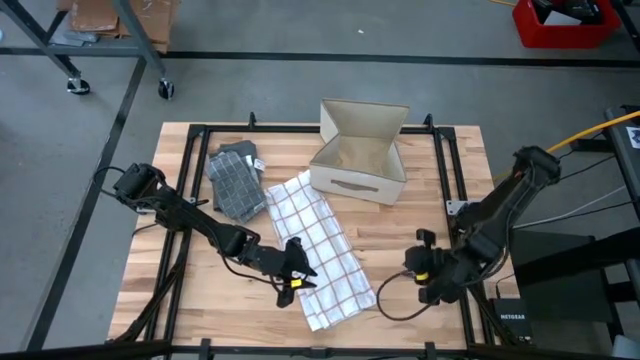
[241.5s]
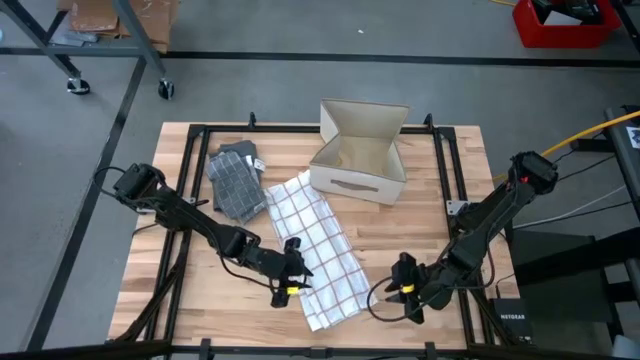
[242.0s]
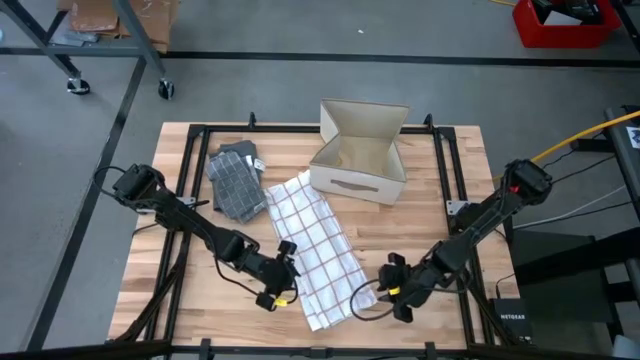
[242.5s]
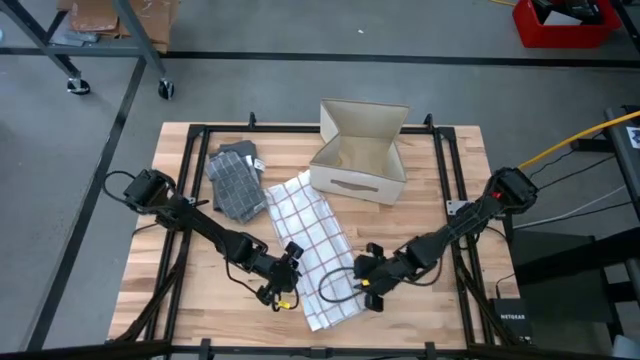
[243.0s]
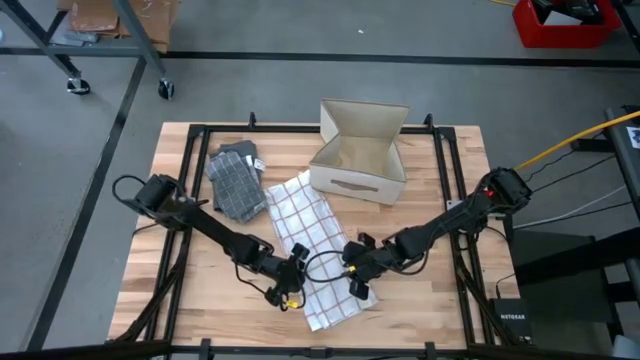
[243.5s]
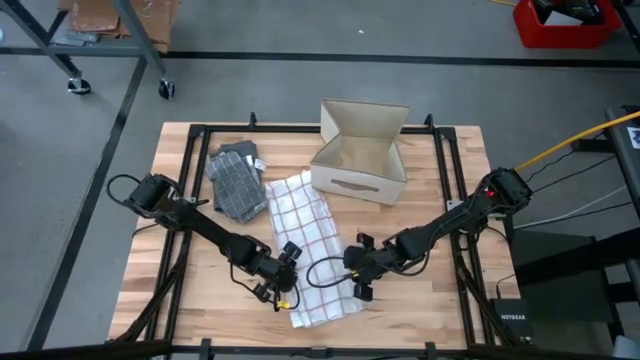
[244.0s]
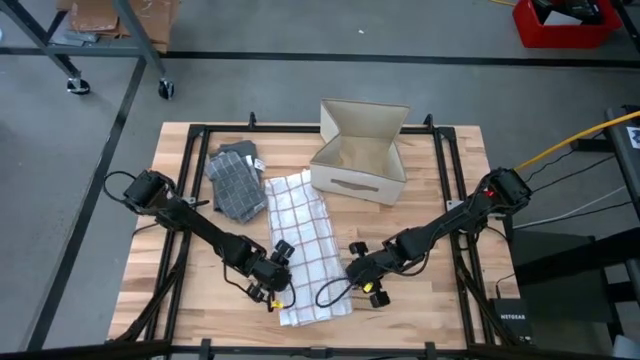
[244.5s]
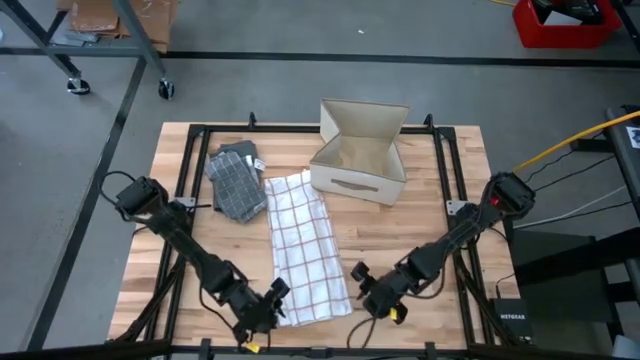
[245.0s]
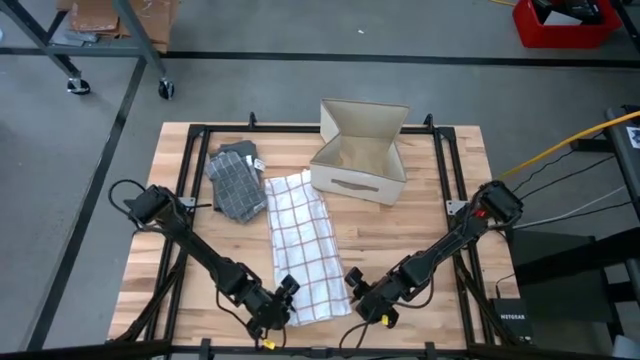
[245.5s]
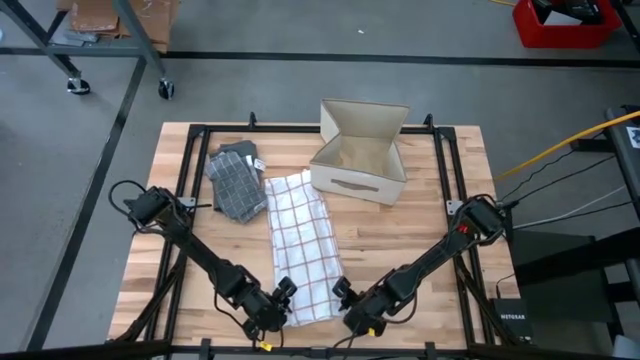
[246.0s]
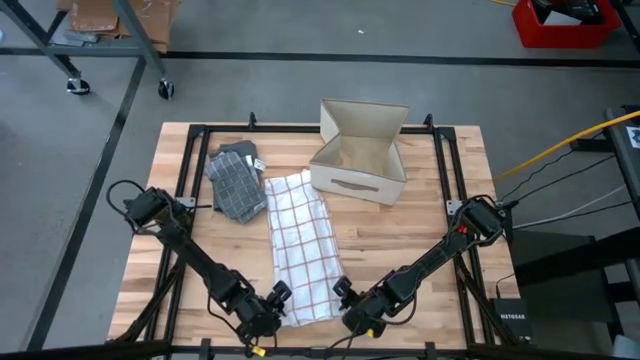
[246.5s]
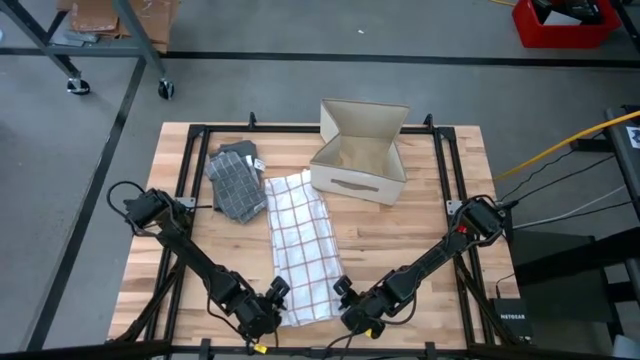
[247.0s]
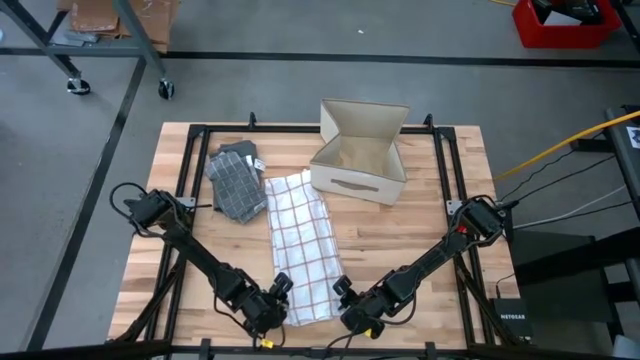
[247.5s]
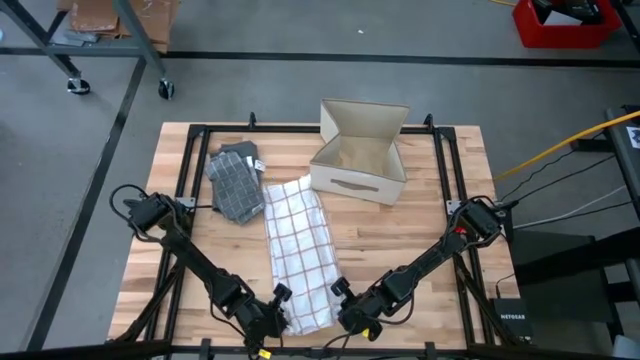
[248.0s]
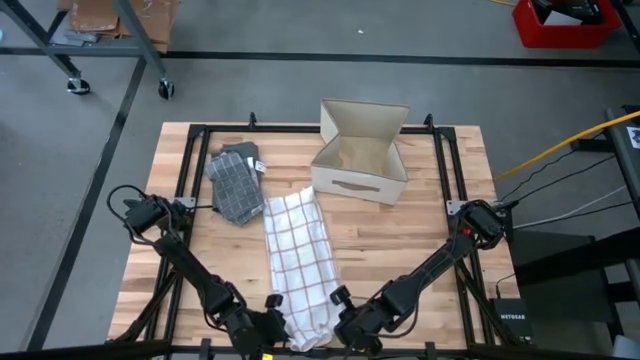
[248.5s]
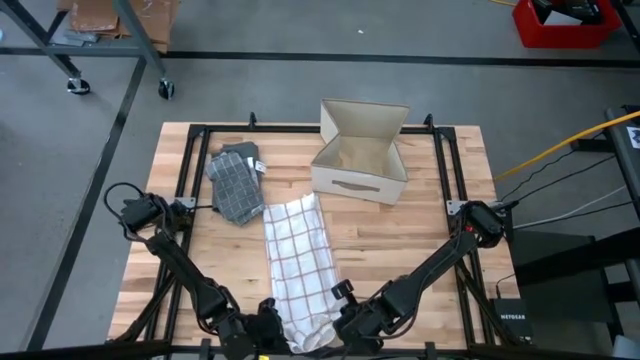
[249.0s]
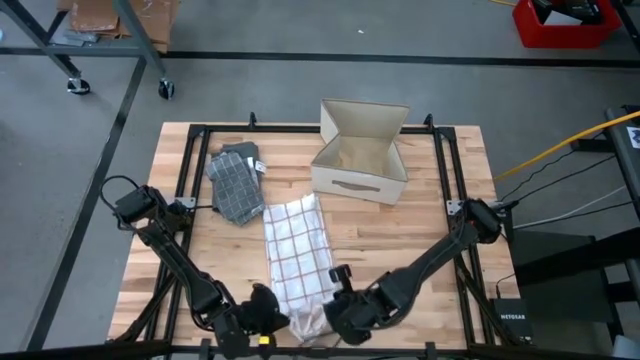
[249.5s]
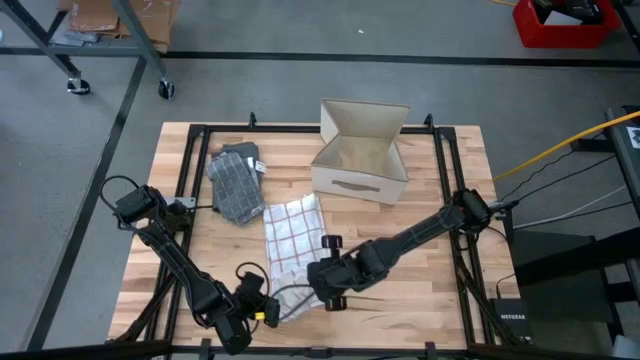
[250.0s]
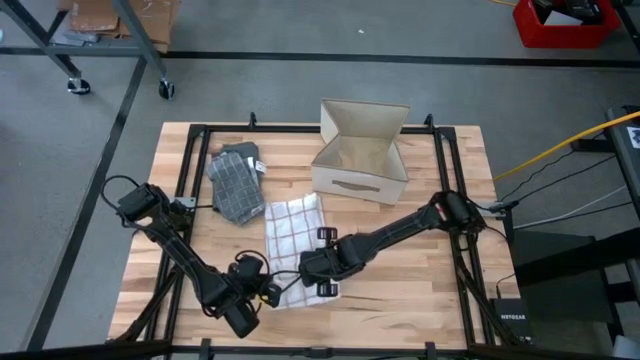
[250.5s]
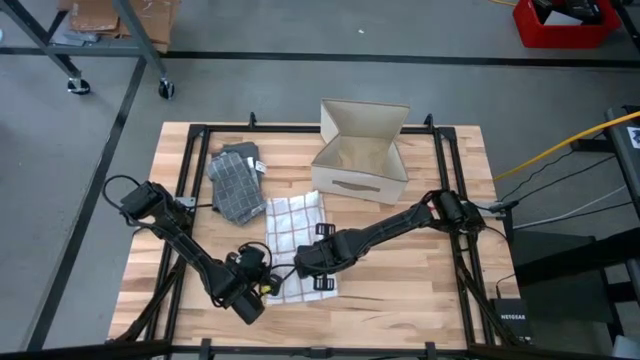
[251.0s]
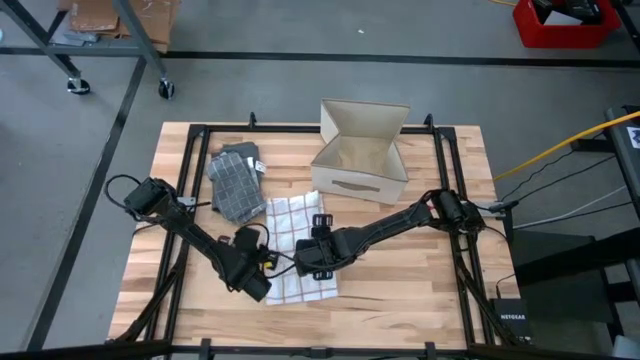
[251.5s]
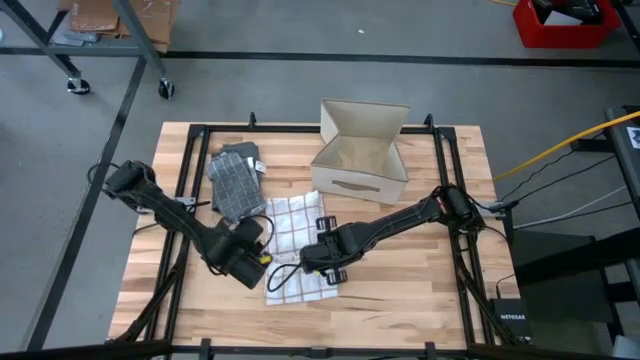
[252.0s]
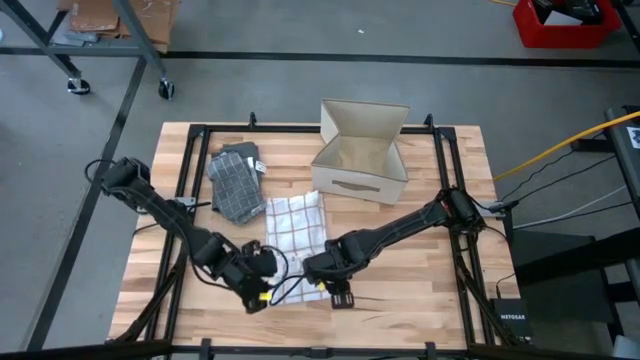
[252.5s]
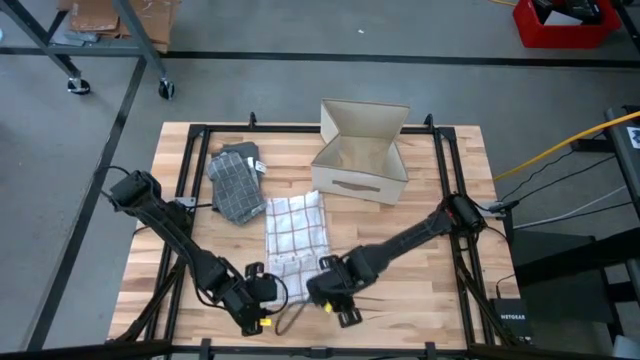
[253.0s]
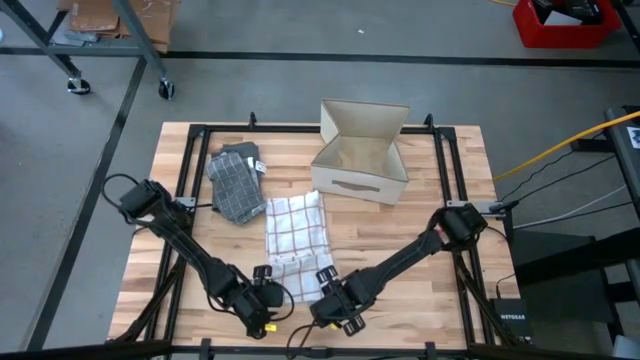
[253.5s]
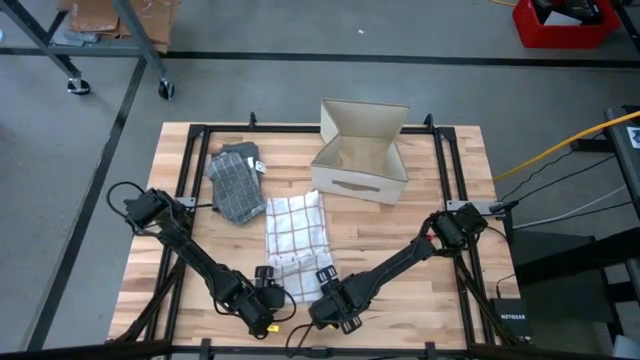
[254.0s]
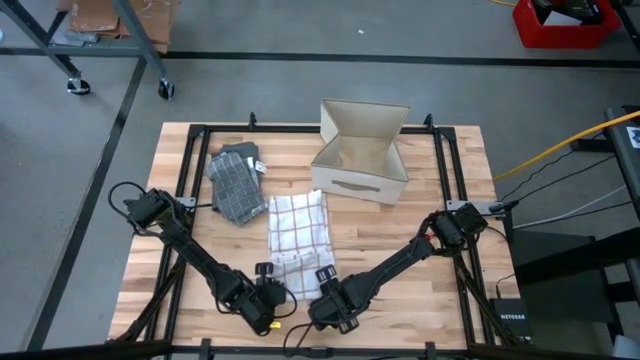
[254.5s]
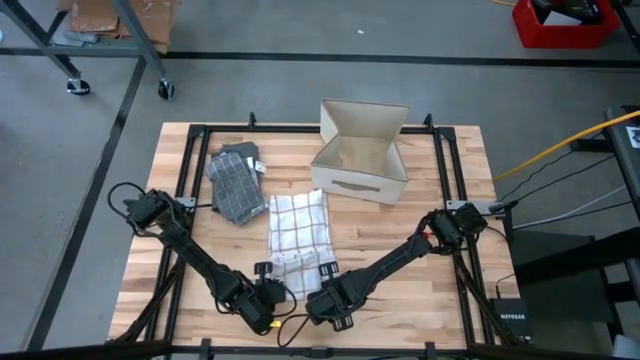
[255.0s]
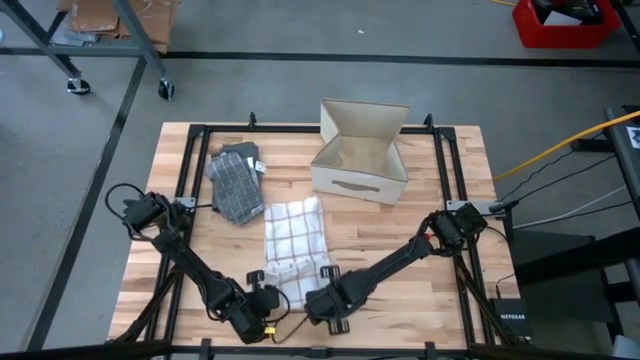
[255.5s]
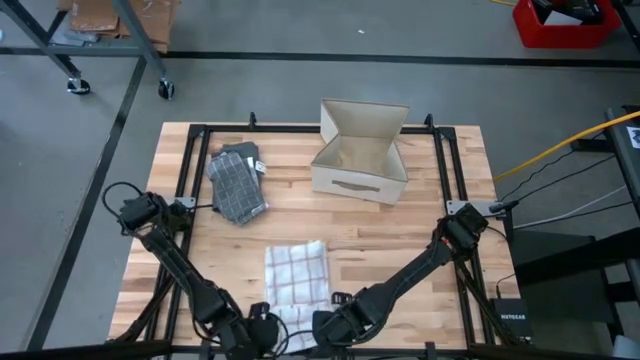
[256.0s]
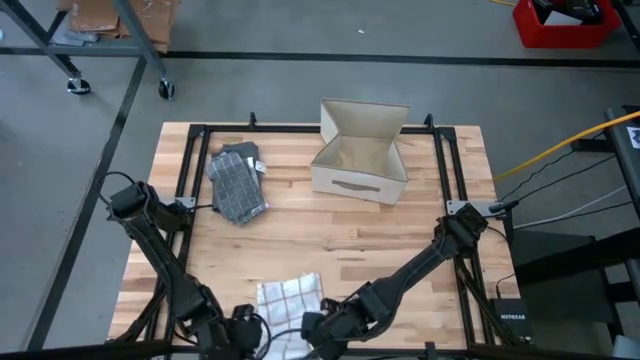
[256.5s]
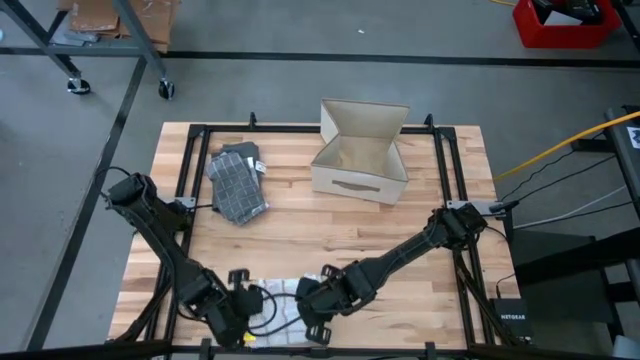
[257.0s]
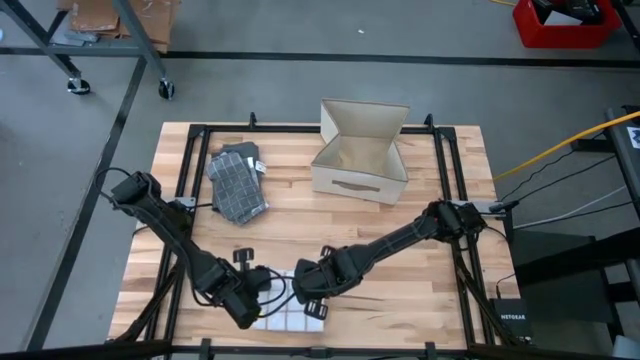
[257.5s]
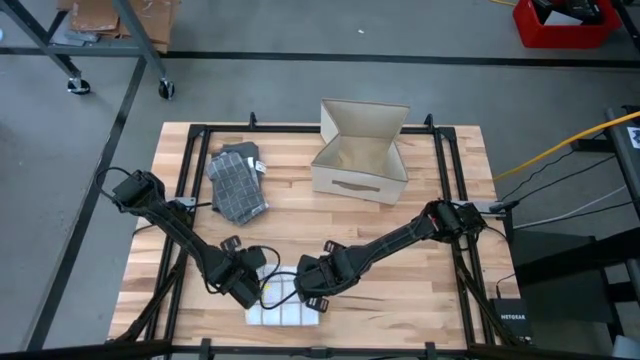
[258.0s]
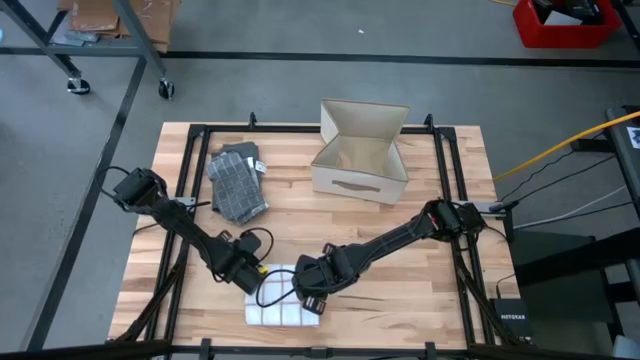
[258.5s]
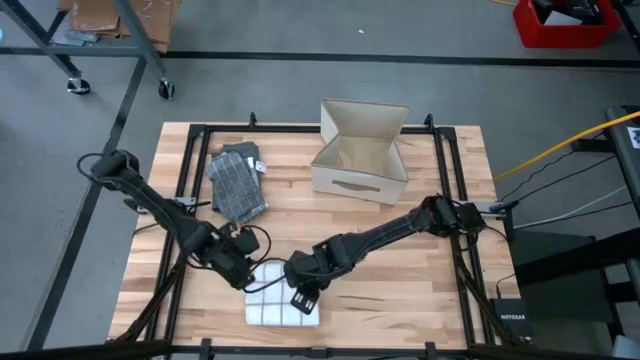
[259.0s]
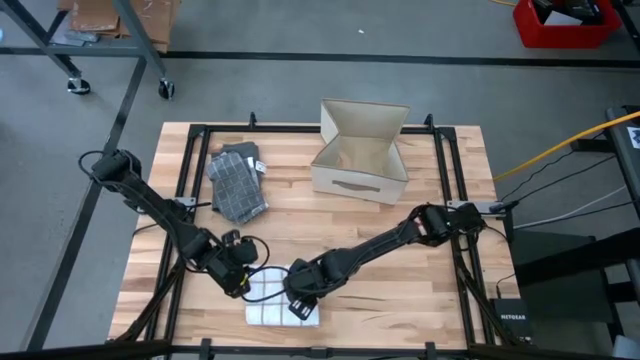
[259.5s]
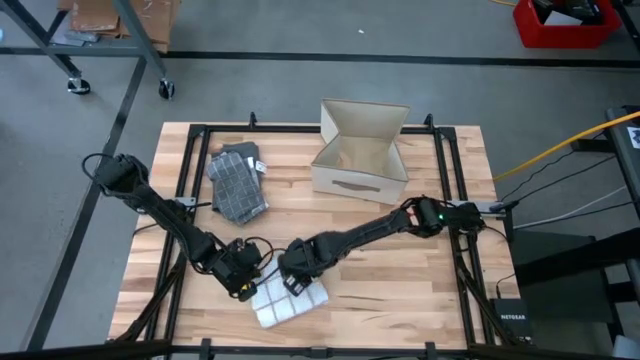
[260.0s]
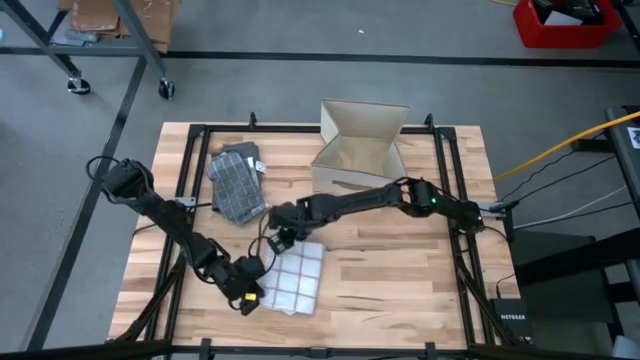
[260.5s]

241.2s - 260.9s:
Task: Fold towel
Fold the white towel
